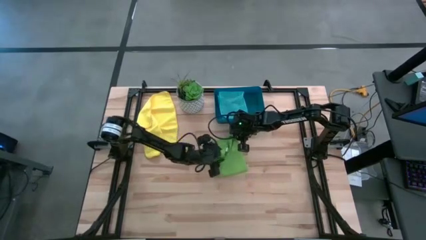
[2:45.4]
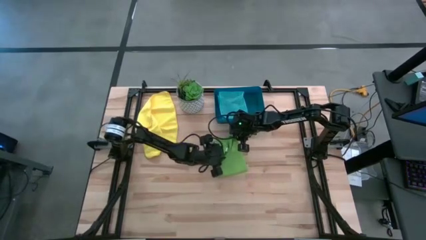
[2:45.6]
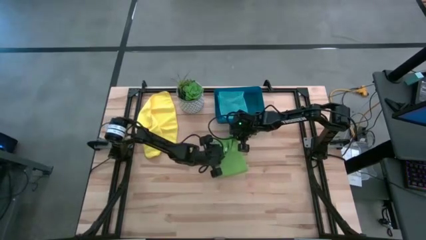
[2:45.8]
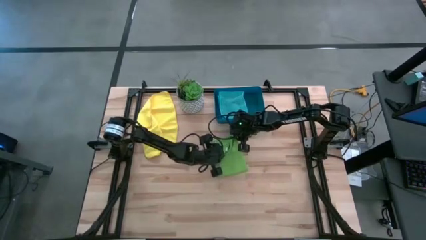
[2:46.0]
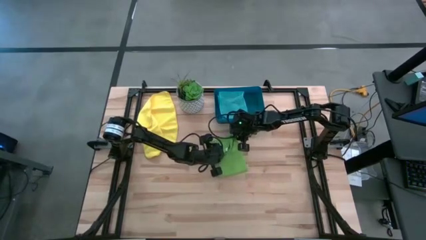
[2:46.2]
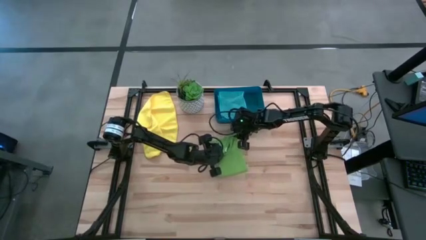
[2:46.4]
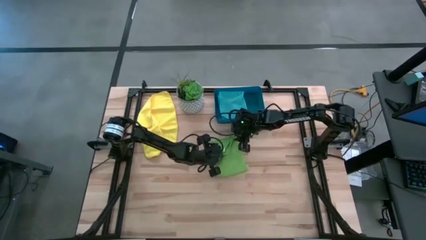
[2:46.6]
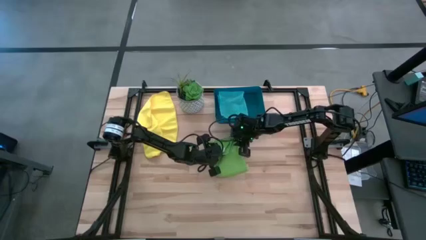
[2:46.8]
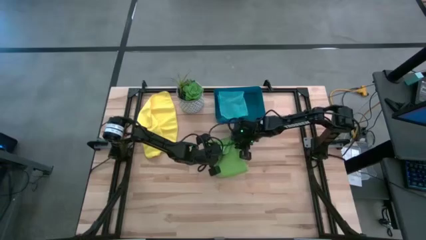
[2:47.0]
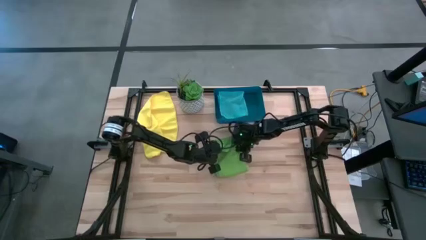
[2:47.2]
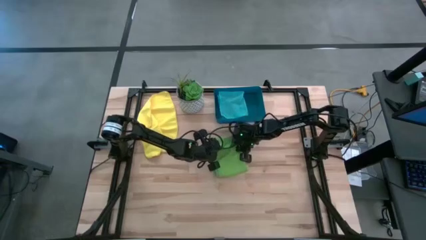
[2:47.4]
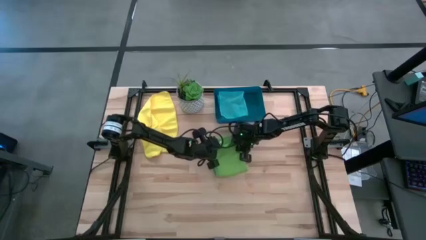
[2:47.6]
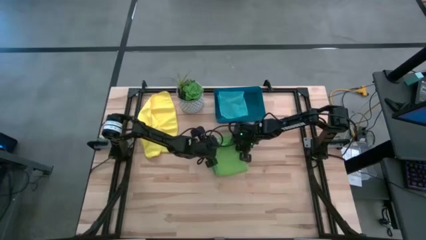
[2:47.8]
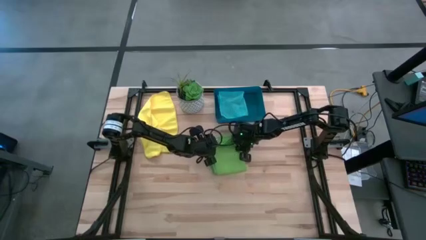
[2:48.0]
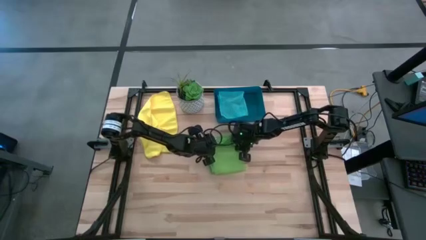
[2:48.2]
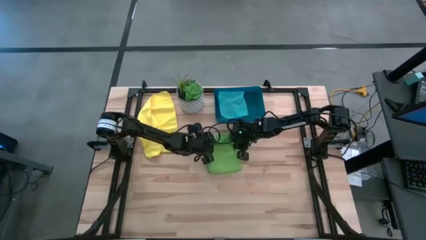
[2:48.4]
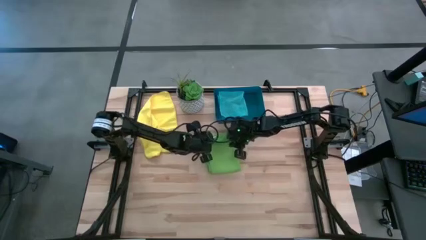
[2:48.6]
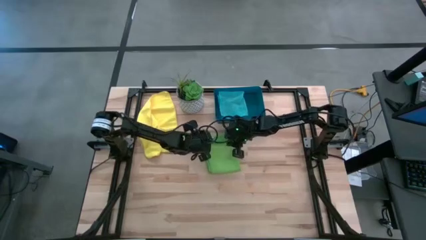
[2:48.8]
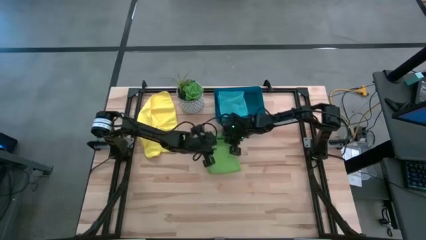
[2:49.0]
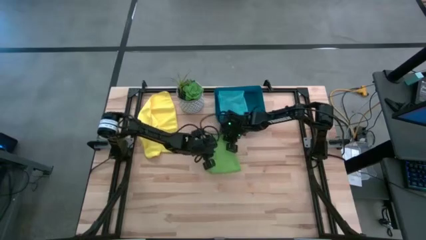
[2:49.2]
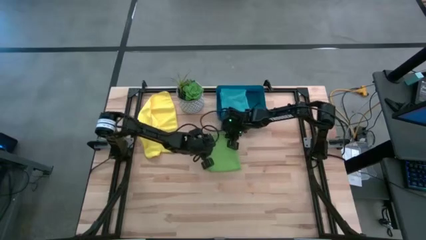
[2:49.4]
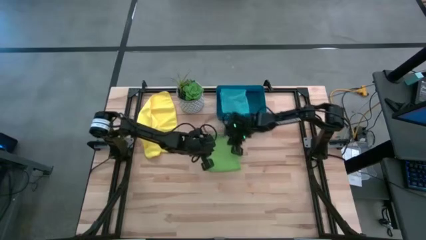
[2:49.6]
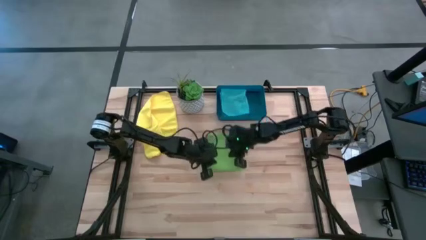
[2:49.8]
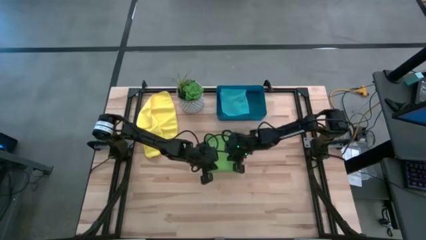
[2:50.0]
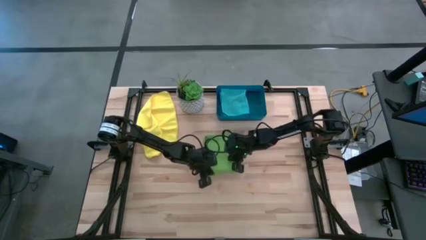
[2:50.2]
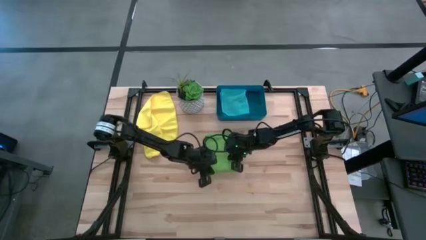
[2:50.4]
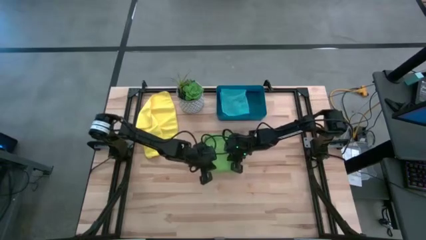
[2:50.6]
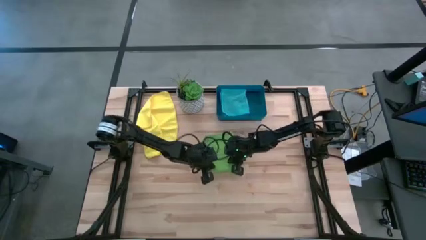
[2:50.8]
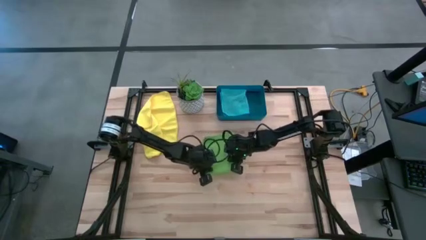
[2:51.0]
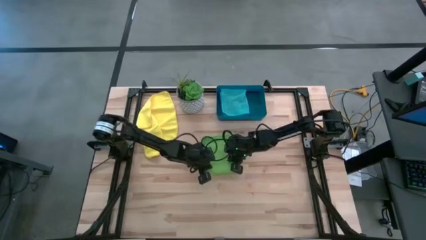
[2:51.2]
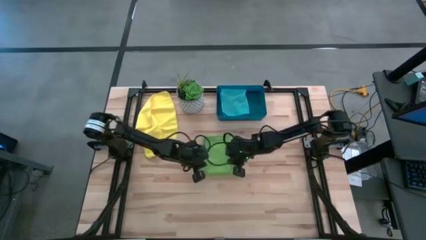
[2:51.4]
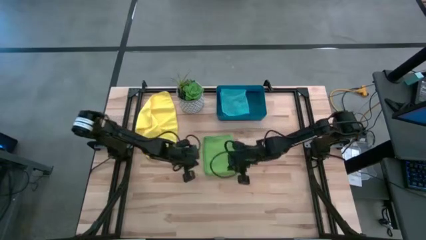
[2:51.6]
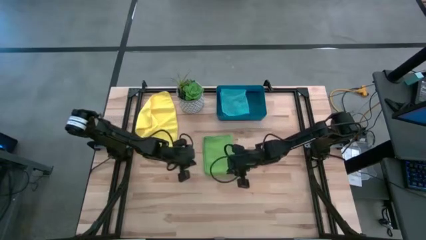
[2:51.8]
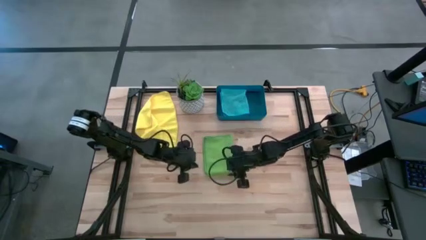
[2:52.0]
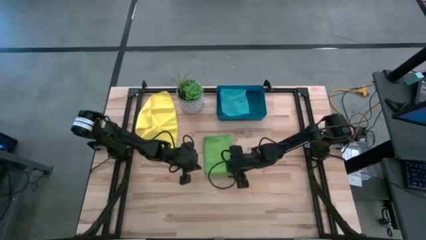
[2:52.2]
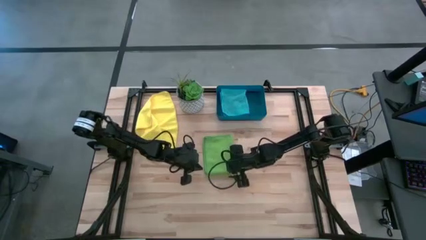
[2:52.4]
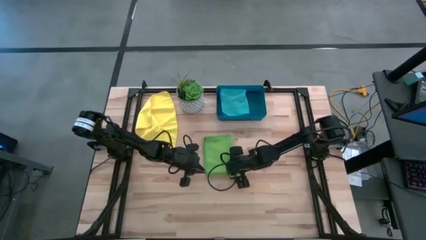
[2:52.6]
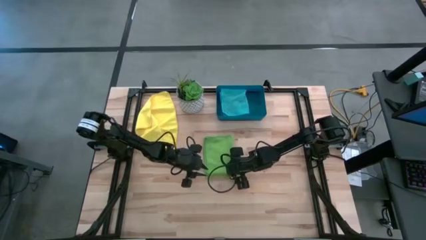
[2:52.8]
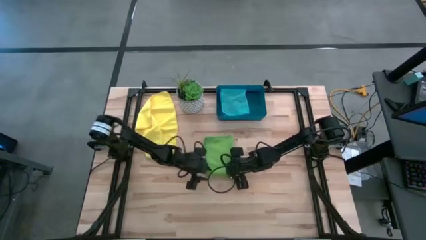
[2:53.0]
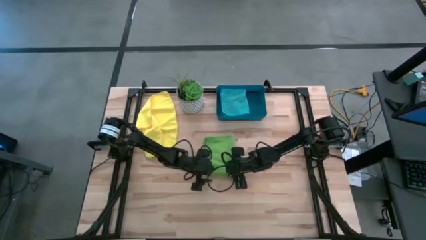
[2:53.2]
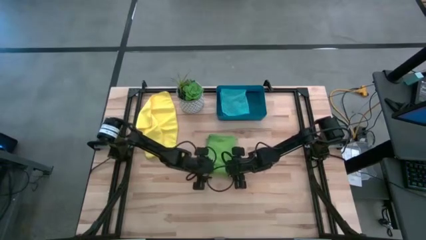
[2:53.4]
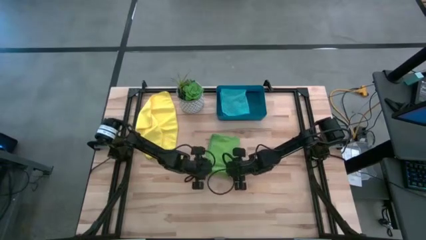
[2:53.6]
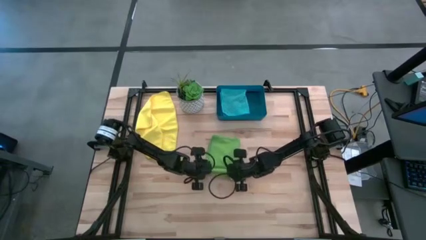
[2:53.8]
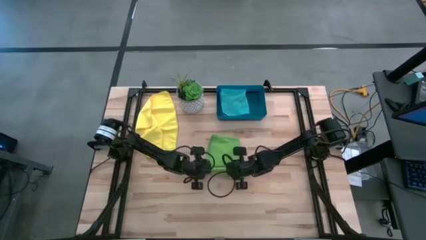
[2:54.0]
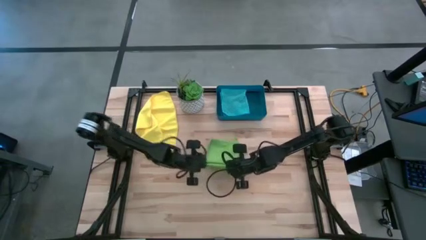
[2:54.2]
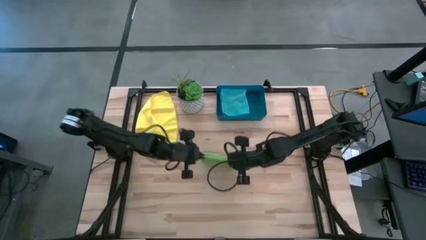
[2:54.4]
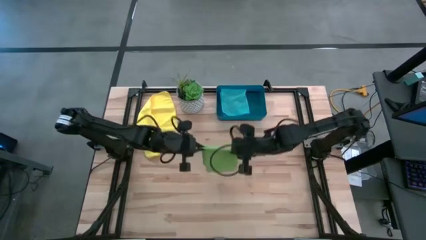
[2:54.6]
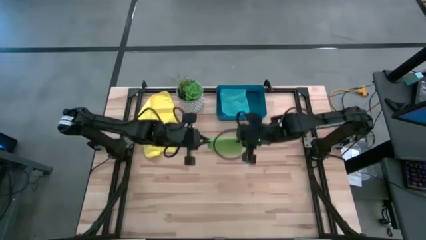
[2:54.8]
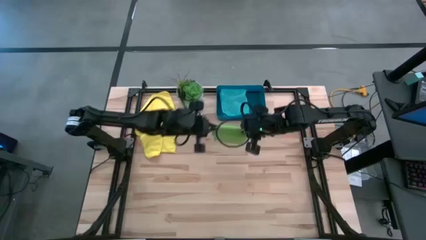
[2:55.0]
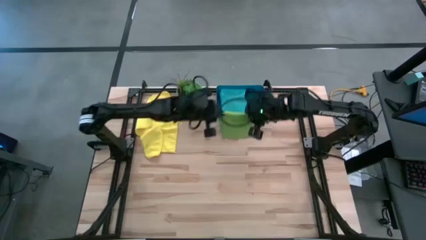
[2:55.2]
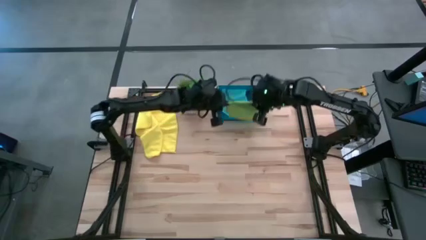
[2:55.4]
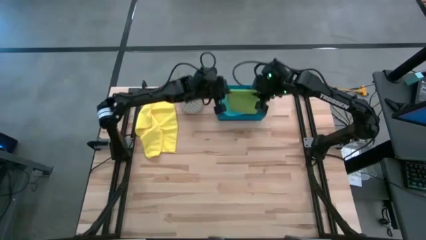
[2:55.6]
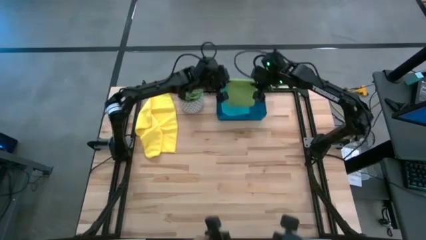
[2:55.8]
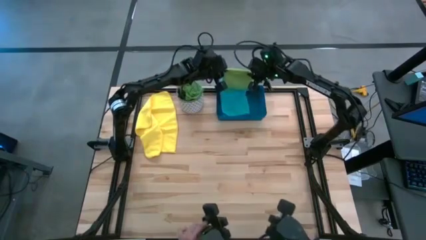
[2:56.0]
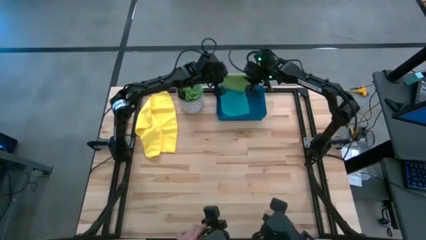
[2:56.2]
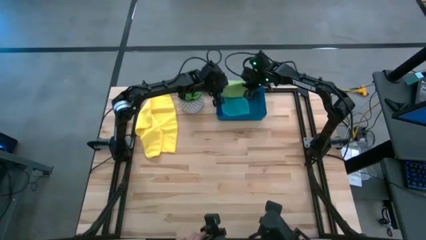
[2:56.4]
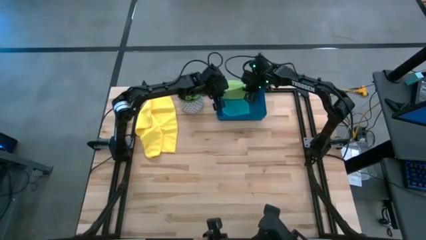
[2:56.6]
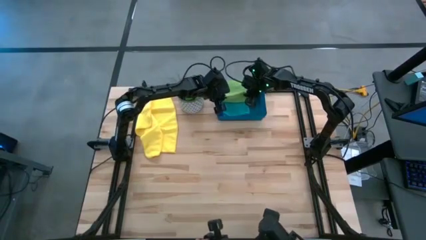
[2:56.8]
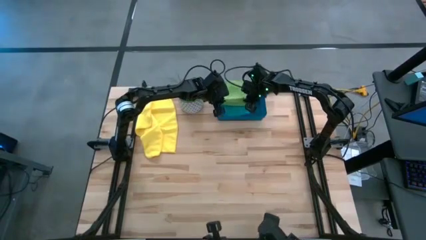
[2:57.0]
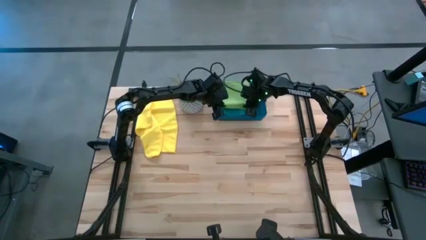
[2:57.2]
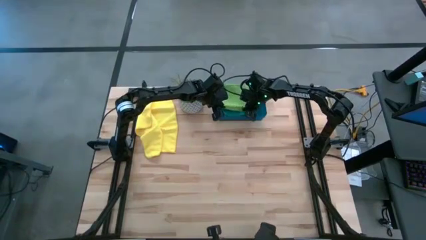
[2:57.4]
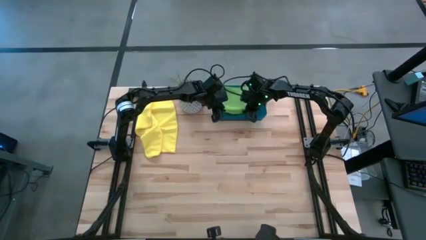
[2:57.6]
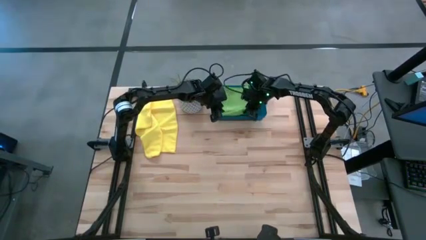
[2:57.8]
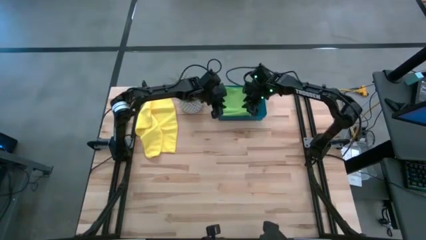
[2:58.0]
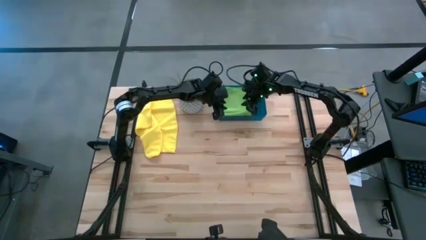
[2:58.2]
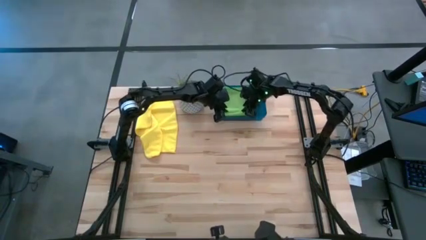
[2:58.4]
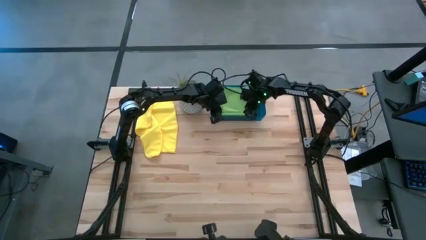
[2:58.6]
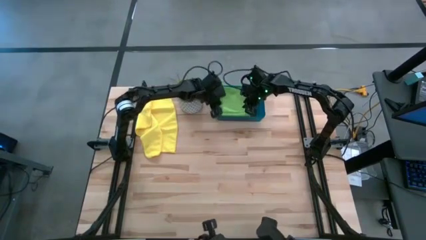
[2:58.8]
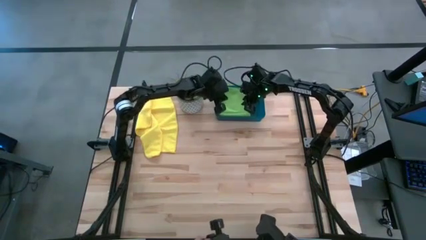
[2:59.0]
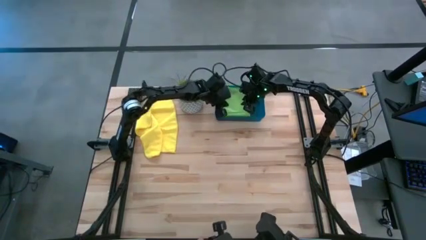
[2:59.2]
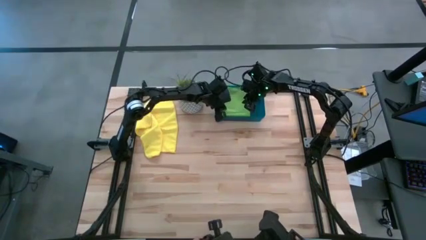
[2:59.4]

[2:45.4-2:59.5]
Task: Fold microfiber towels
Fold the green microfiber towel on top of the light blue microfiber towel into the dark blue bin
